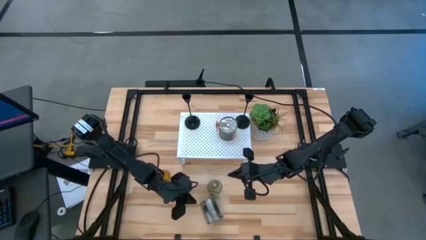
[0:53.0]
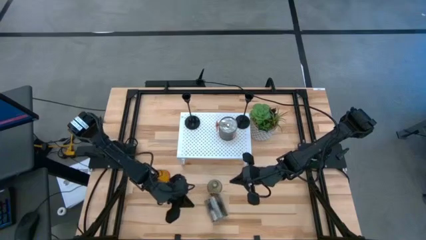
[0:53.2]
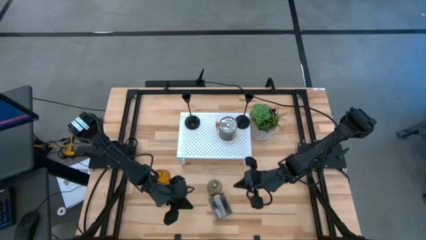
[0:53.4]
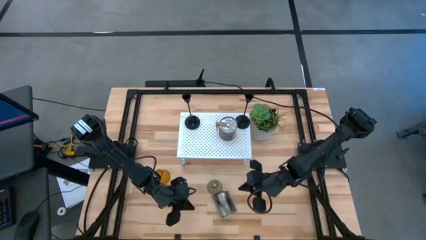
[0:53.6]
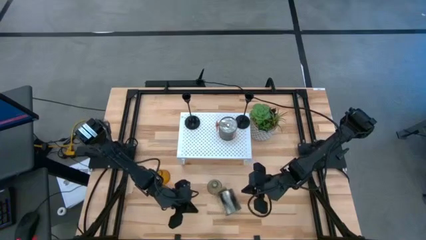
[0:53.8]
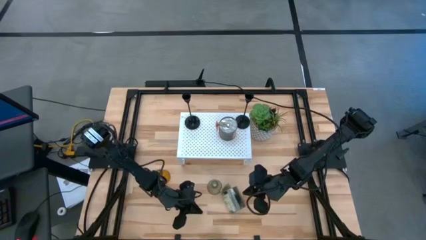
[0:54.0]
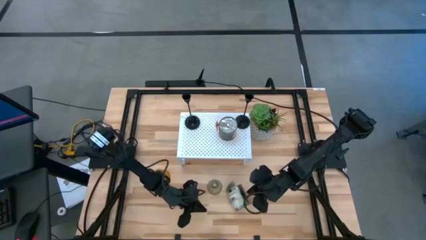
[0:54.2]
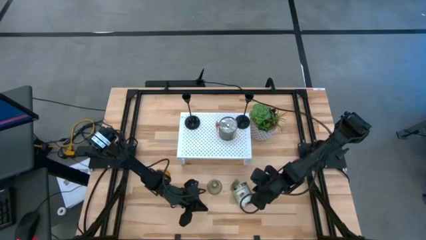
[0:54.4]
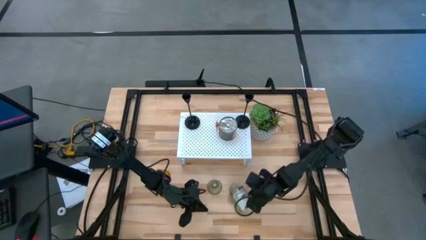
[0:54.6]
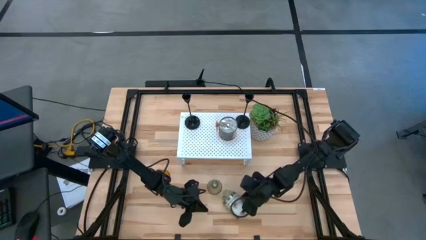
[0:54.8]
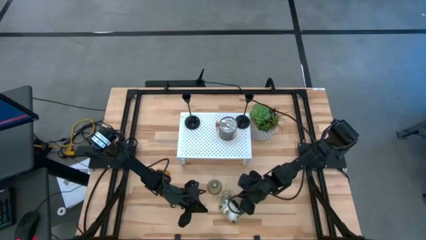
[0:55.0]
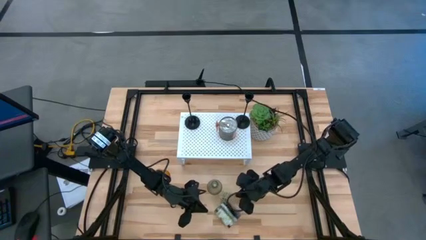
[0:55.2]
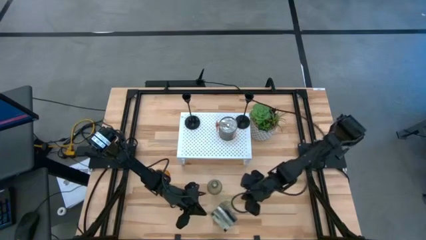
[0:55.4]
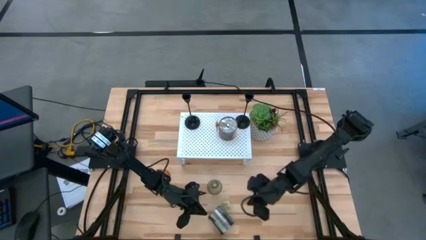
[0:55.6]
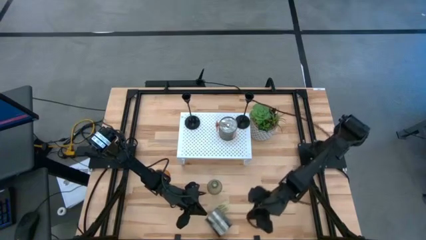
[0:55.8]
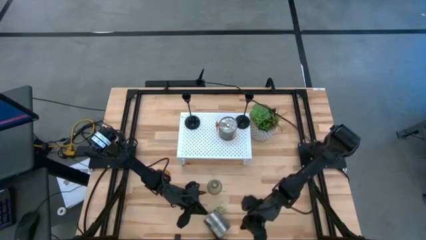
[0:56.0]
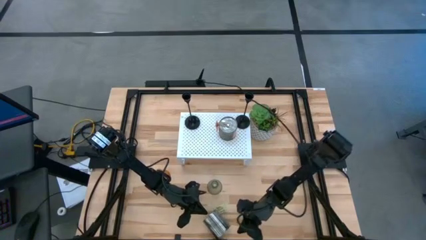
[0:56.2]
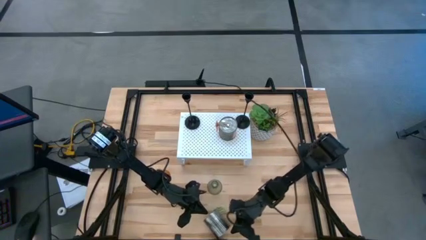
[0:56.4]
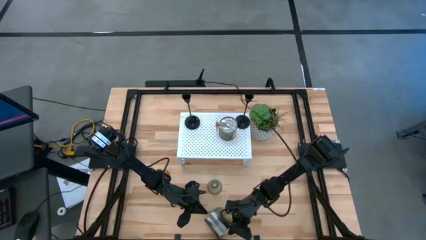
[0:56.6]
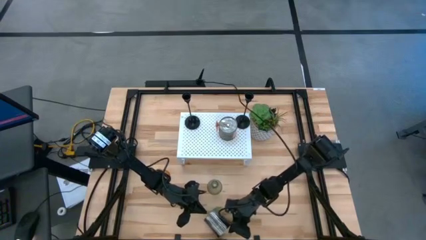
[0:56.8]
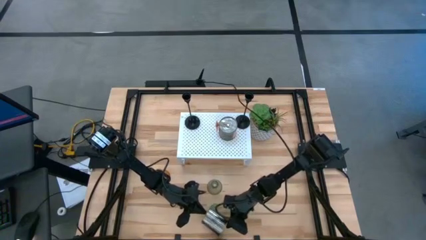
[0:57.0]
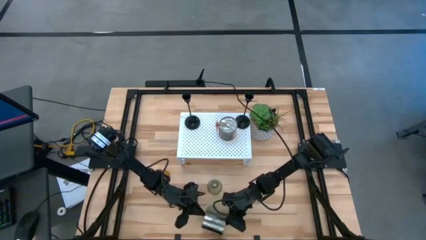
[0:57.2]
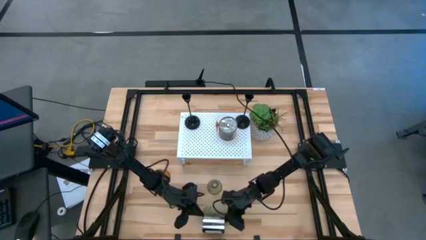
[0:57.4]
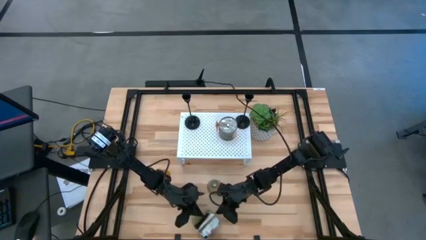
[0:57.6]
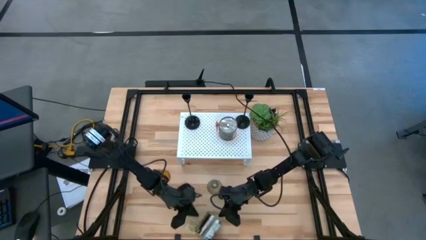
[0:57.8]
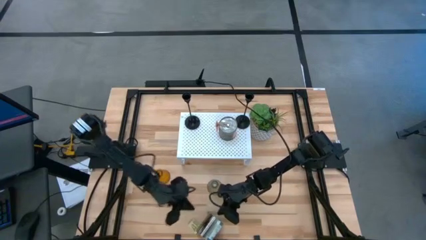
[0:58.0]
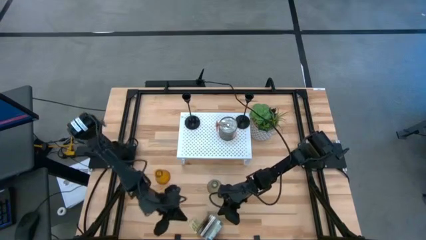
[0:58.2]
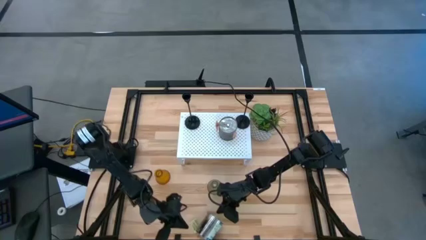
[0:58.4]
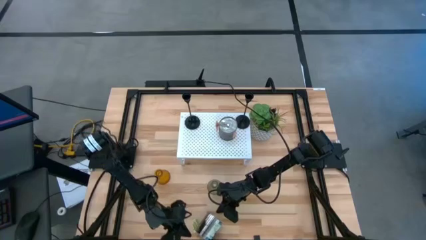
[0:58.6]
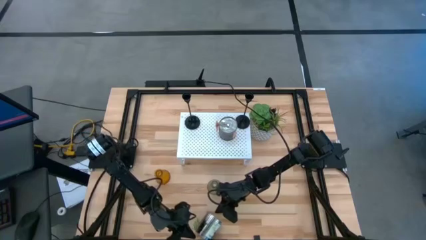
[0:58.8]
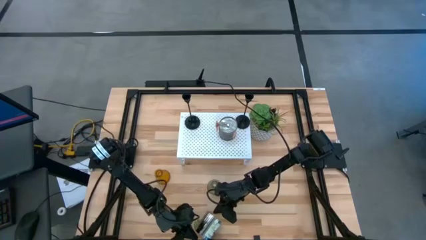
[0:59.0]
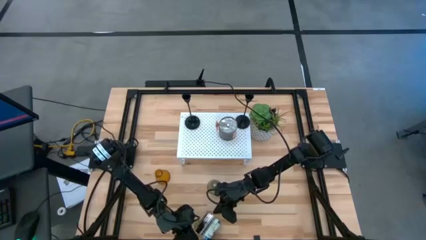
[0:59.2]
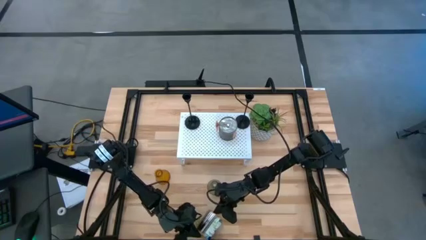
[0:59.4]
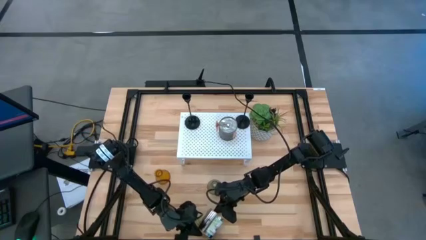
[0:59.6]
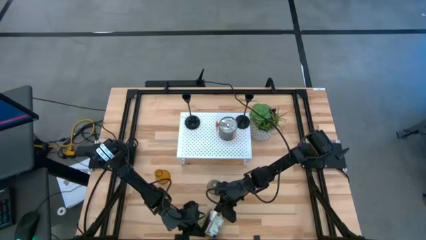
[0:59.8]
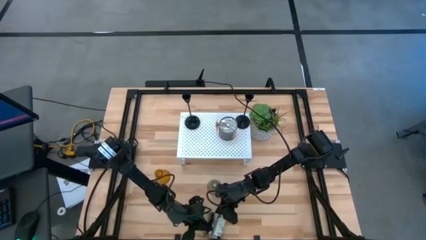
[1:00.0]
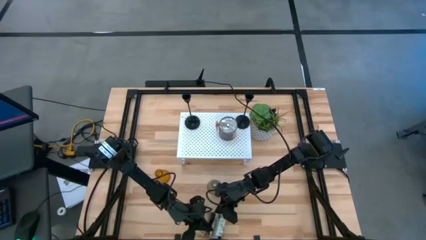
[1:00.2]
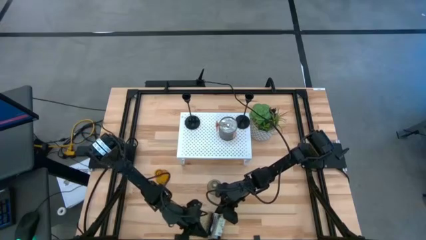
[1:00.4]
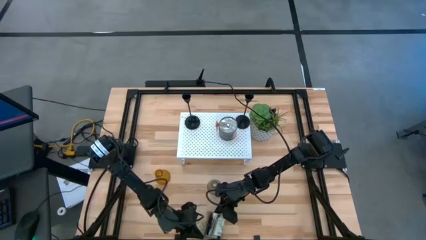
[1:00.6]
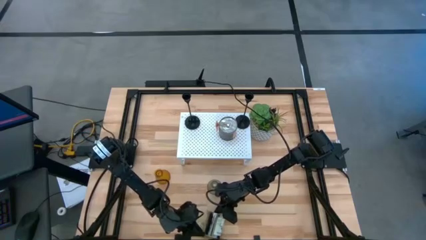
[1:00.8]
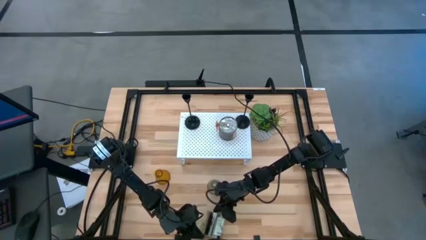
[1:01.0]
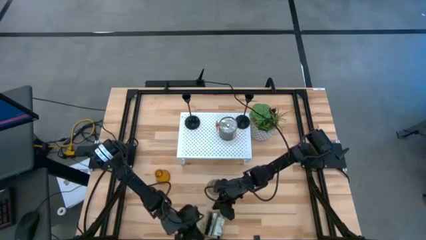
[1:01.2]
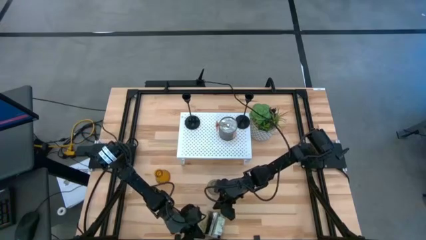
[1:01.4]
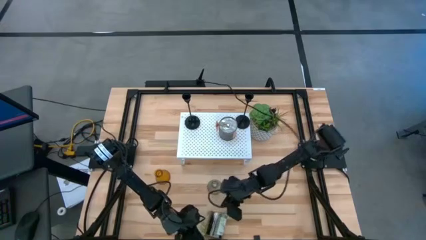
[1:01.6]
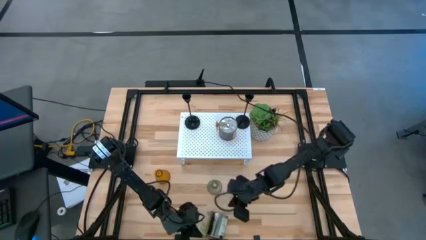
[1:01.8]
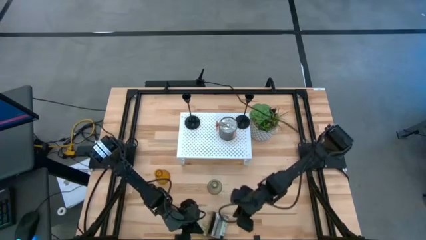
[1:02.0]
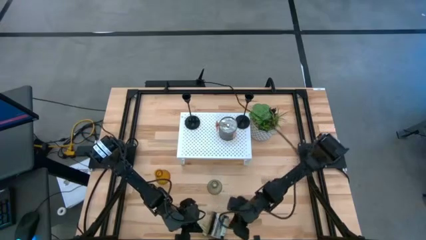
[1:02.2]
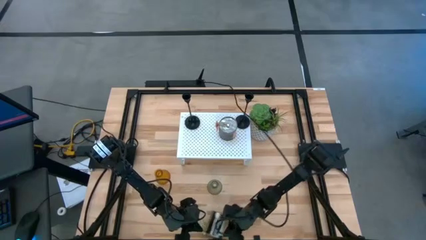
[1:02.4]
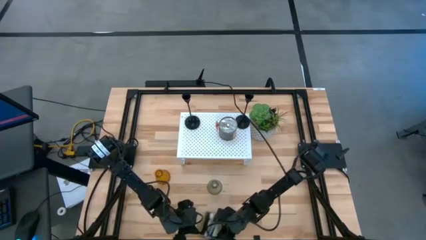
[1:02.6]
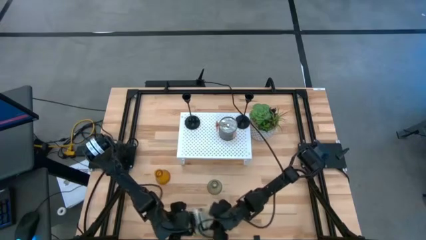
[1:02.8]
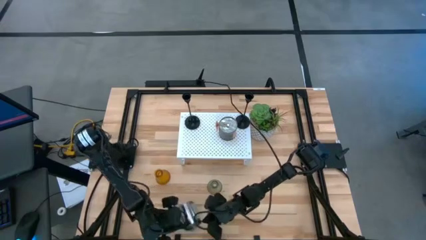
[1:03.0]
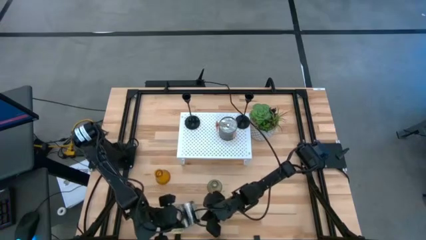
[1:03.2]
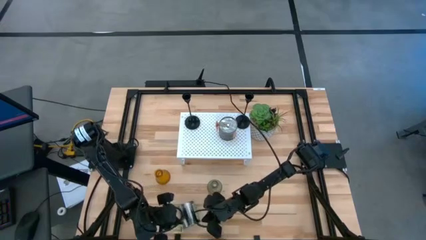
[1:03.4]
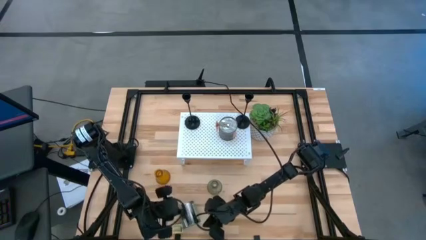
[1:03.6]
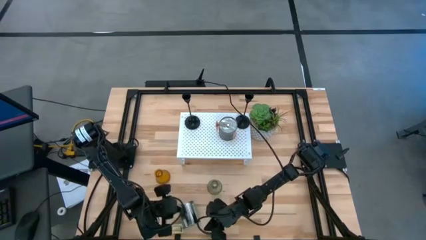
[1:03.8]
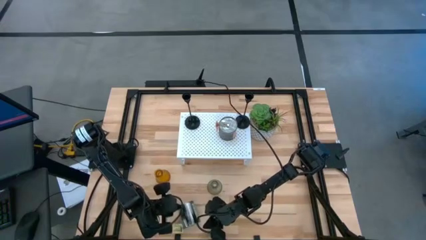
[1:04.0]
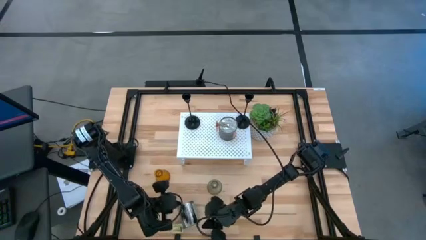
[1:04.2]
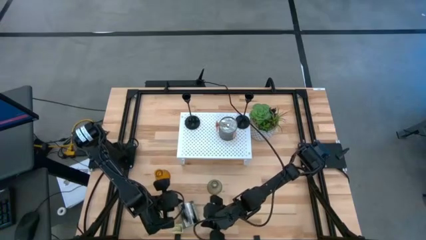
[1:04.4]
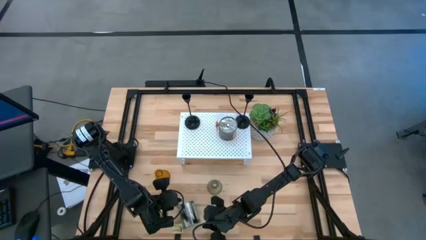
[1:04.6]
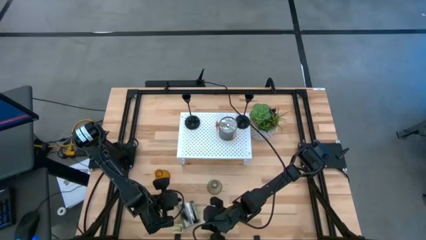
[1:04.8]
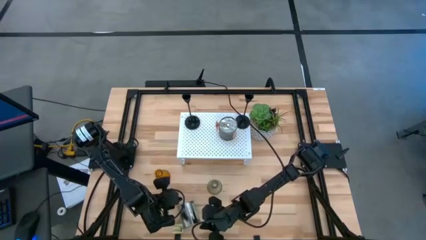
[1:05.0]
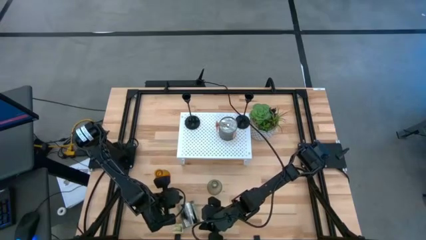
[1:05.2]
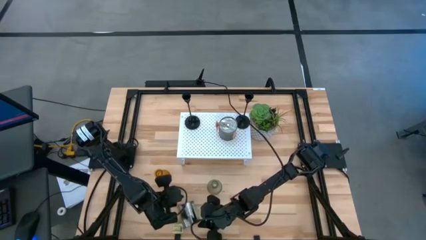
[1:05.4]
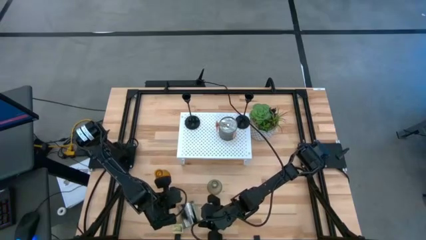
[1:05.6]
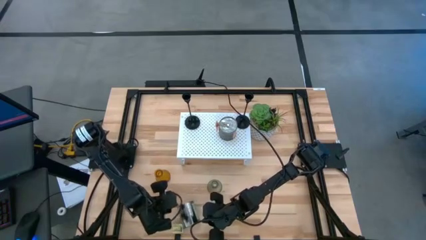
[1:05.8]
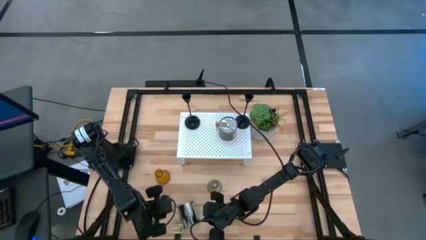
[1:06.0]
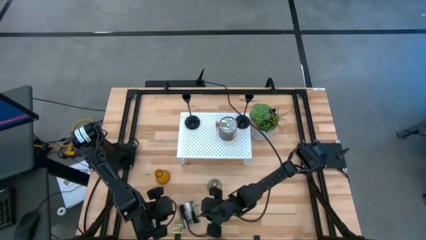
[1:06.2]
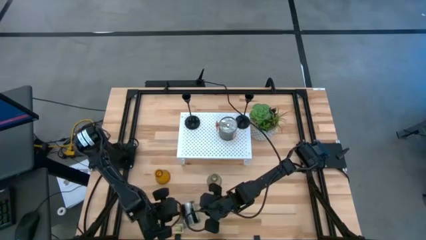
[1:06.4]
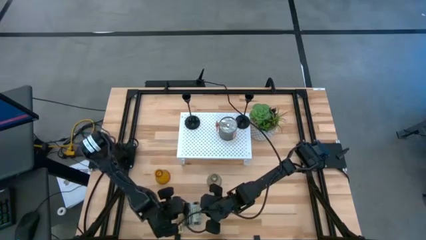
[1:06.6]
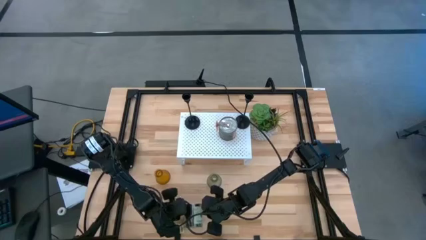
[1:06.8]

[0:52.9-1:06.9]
Task: Pick & Place candle stick holders
Put the green scented candle on the shelf
